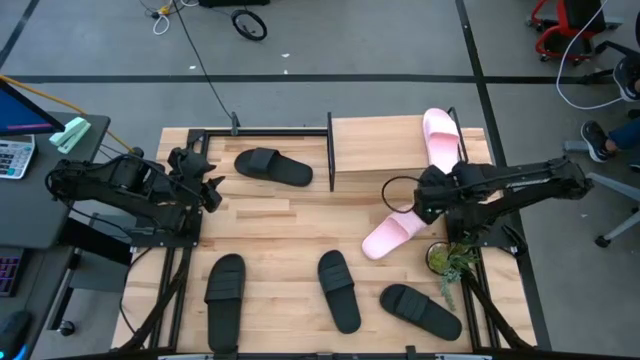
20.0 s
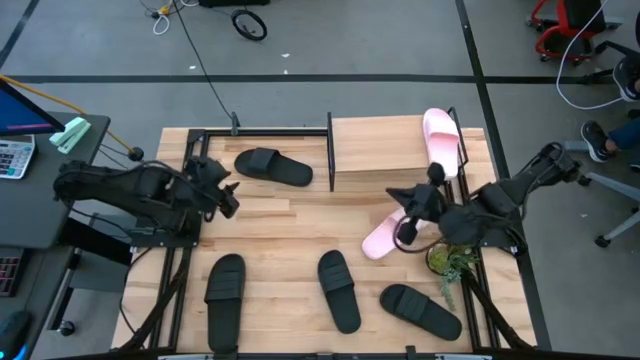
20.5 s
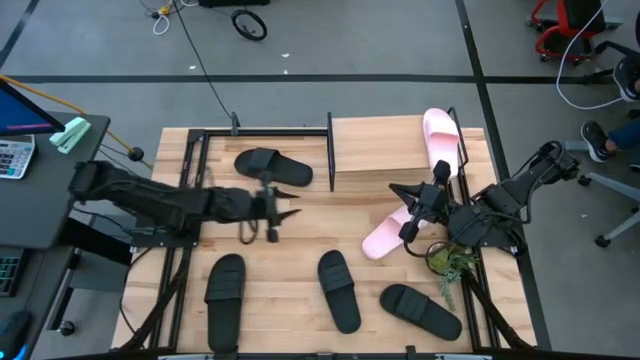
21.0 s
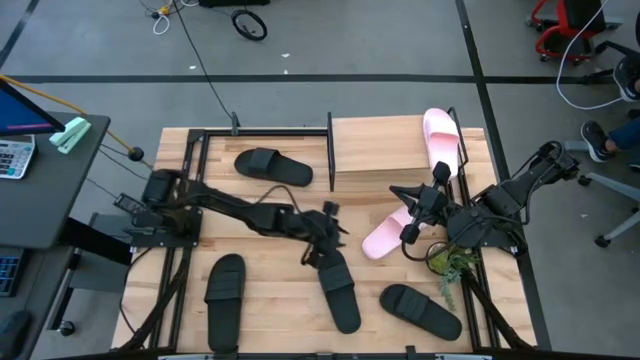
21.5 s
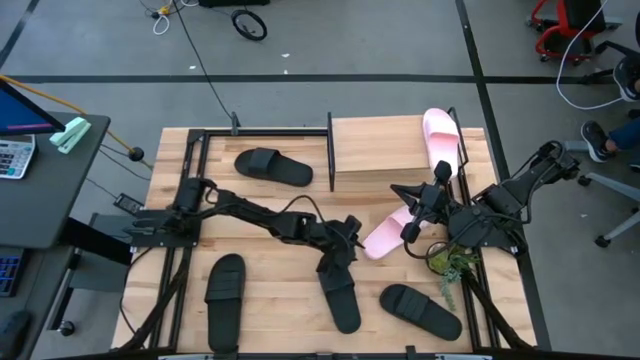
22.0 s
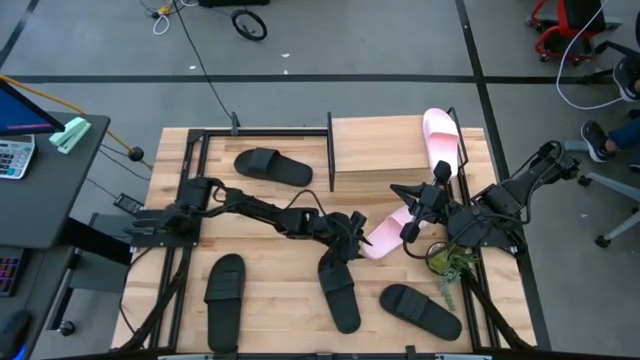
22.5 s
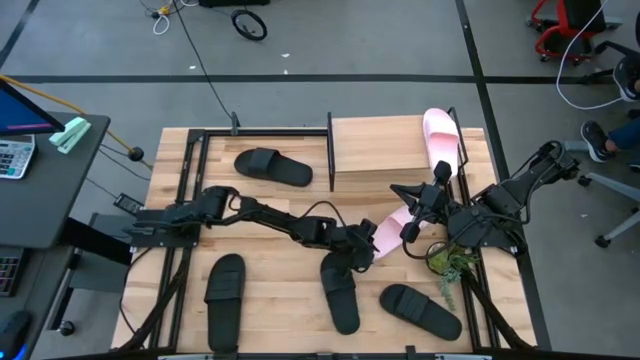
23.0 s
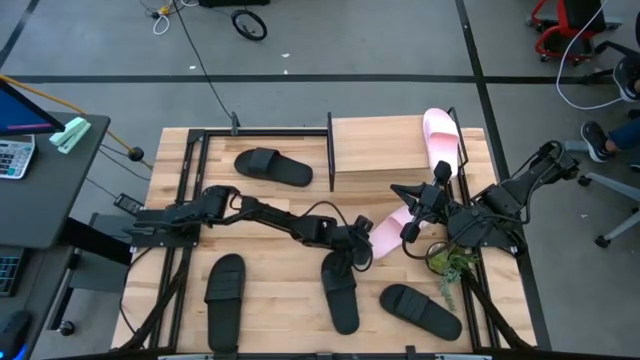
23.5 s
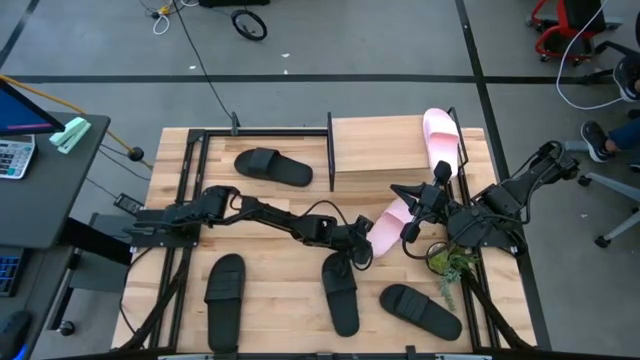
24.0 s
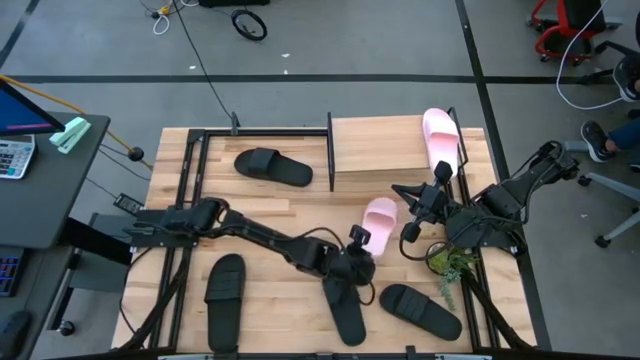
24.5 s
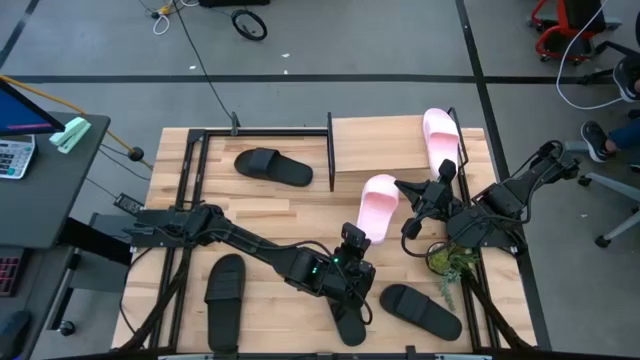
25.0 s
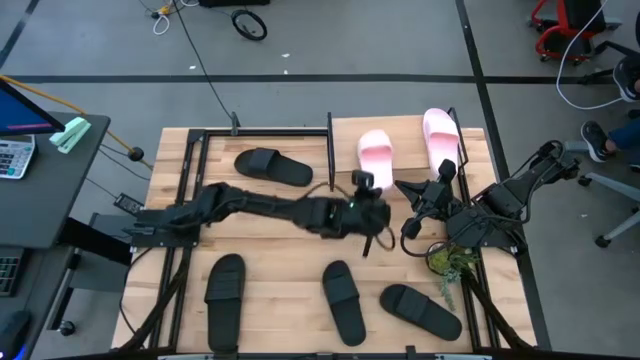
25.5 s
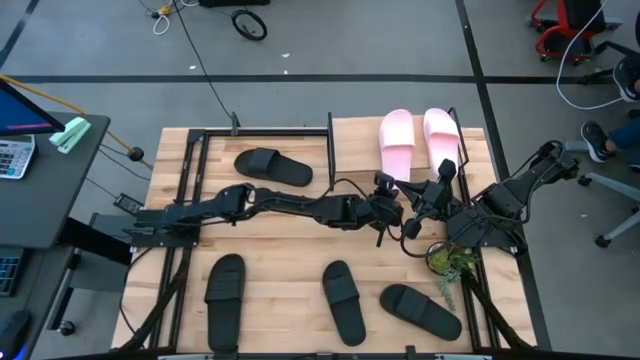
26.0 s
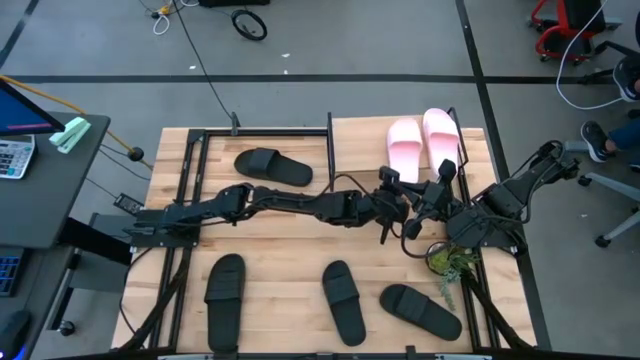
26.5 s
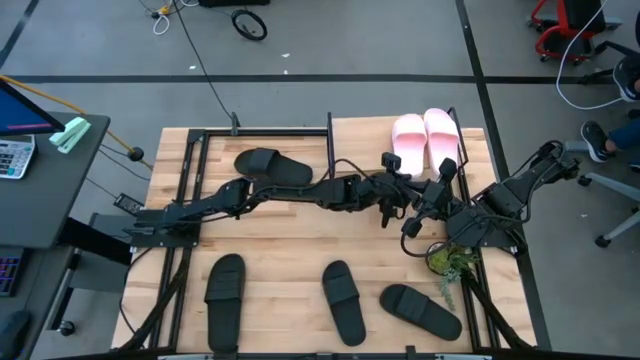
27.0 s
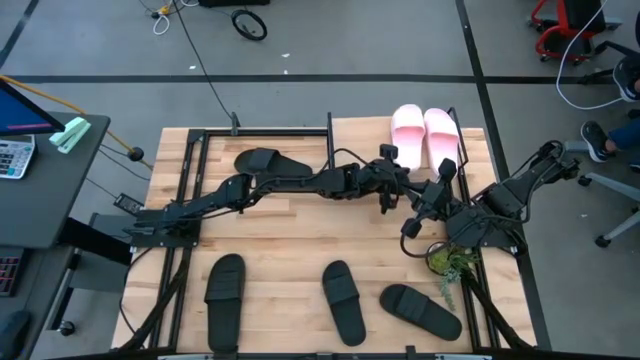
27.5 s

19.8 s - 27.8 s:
Task: Pick and place slides into the shelf
Put the pink slide on the shelf

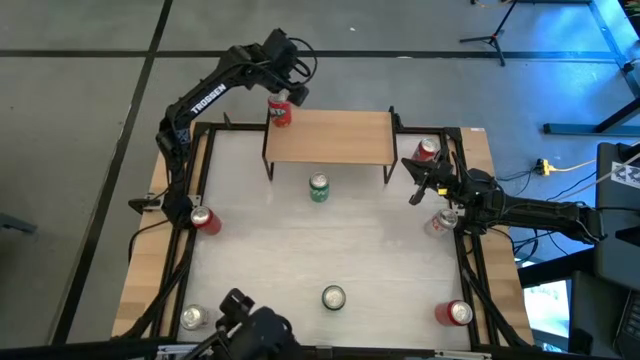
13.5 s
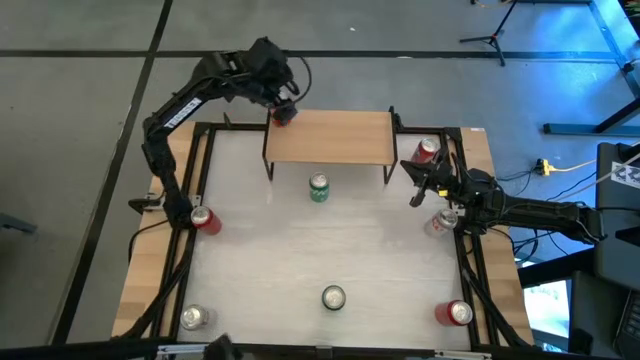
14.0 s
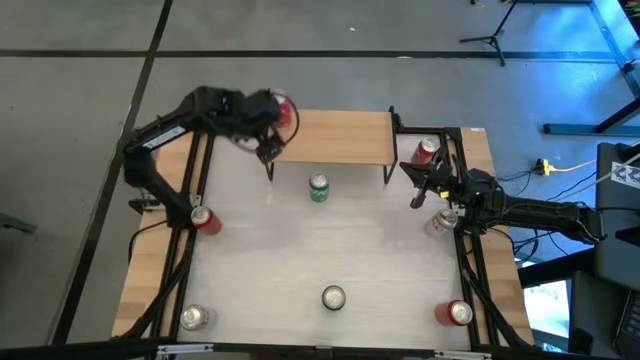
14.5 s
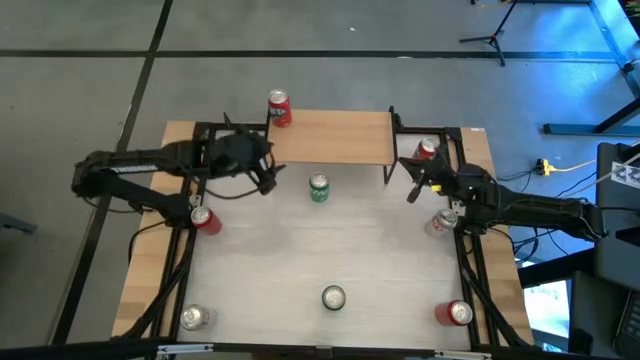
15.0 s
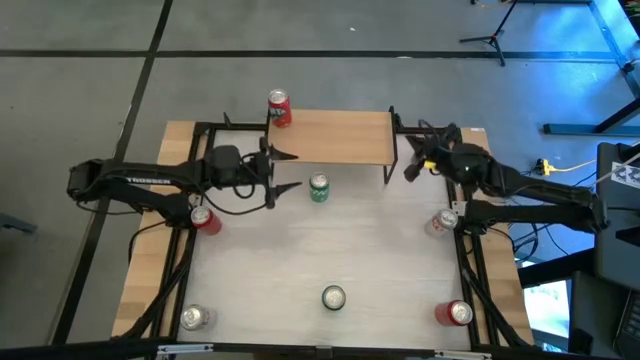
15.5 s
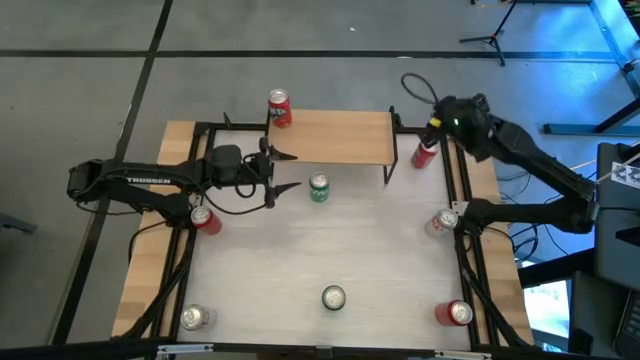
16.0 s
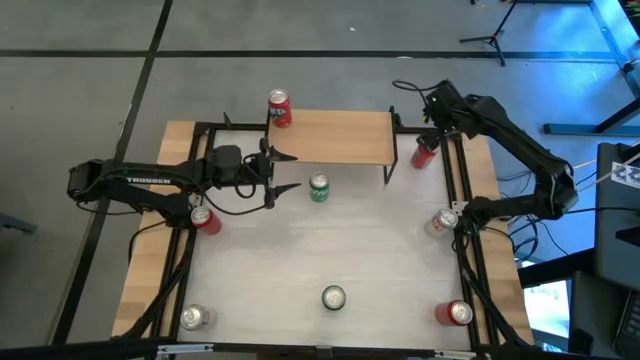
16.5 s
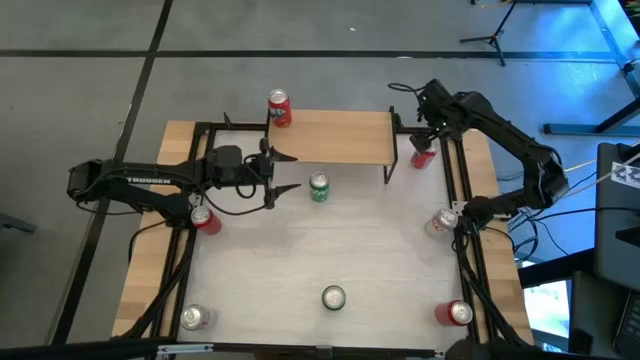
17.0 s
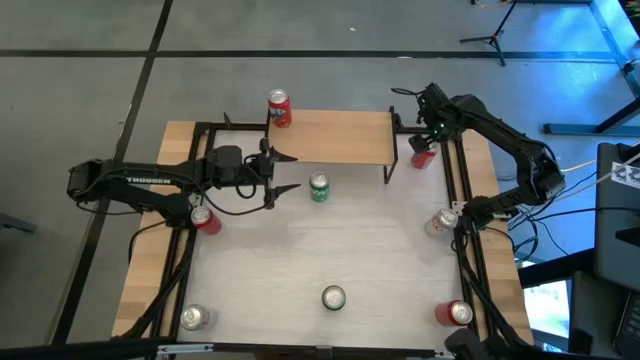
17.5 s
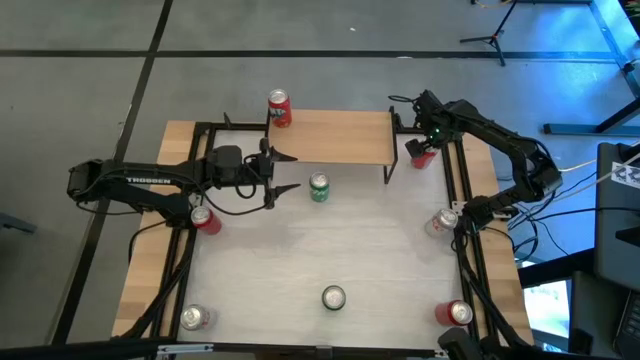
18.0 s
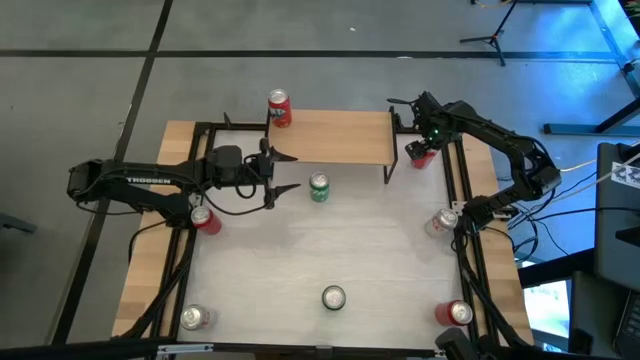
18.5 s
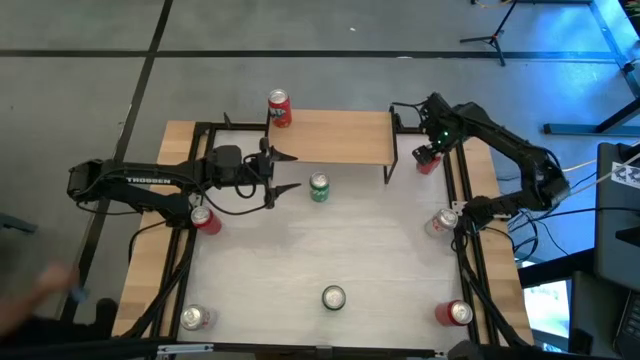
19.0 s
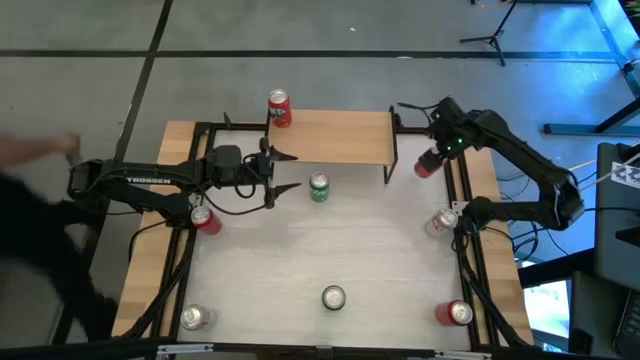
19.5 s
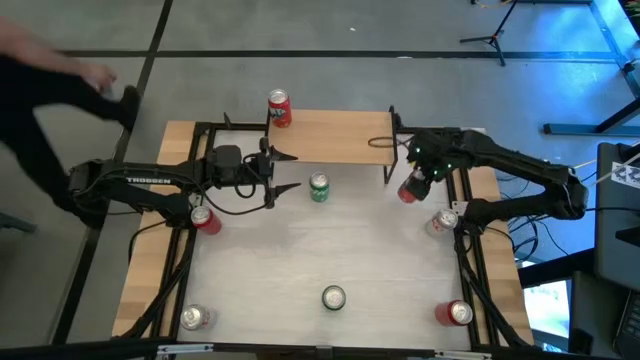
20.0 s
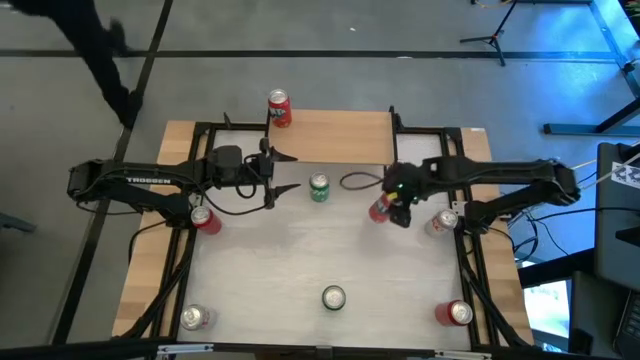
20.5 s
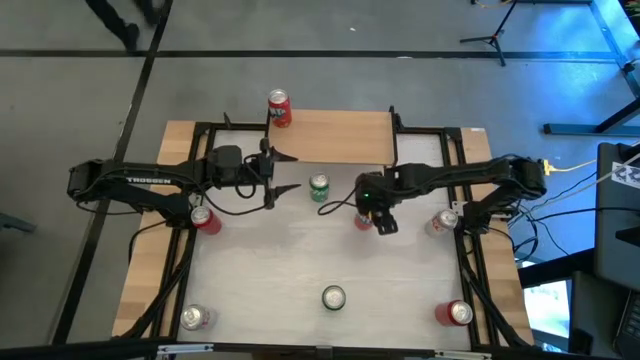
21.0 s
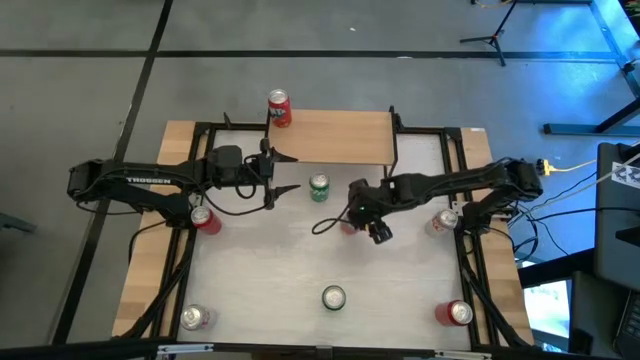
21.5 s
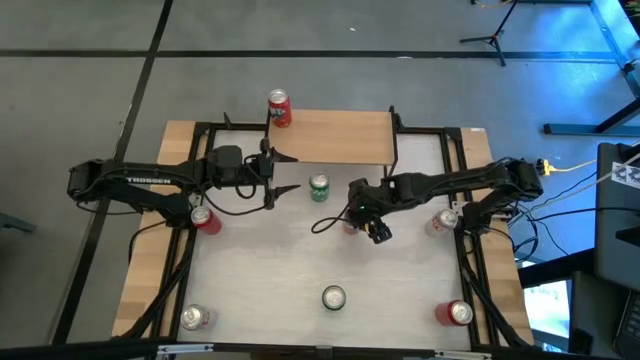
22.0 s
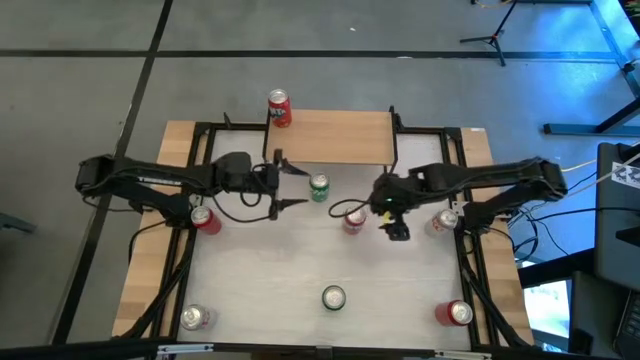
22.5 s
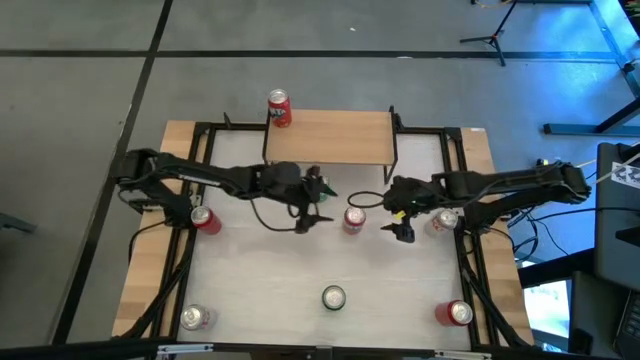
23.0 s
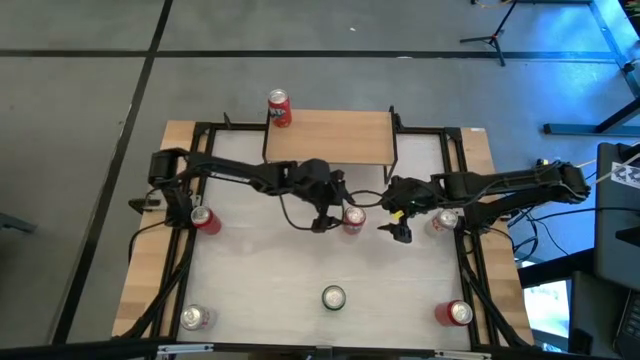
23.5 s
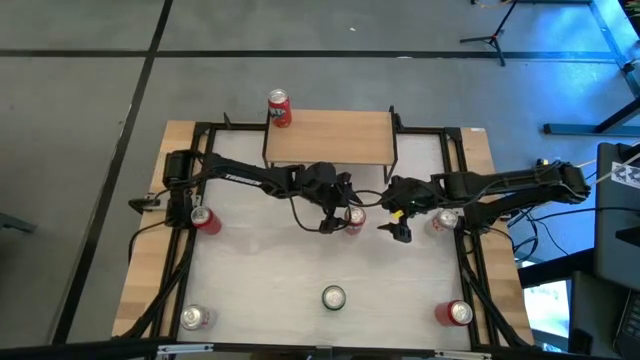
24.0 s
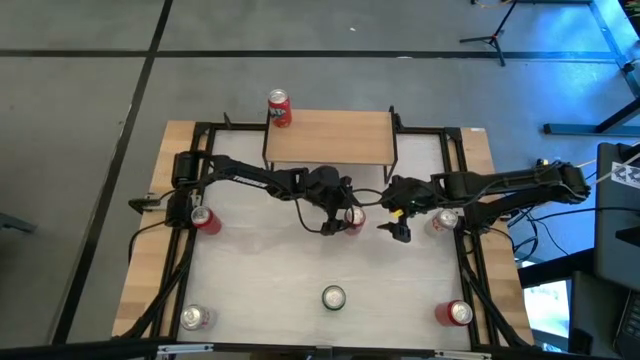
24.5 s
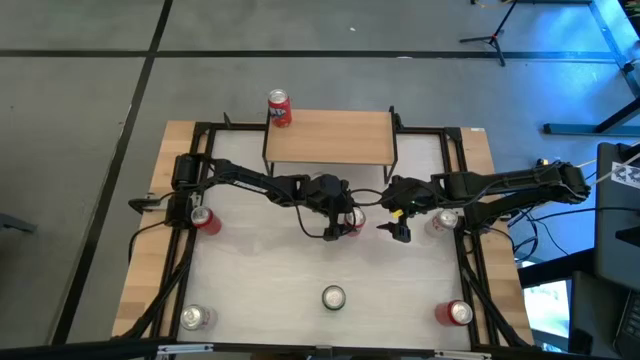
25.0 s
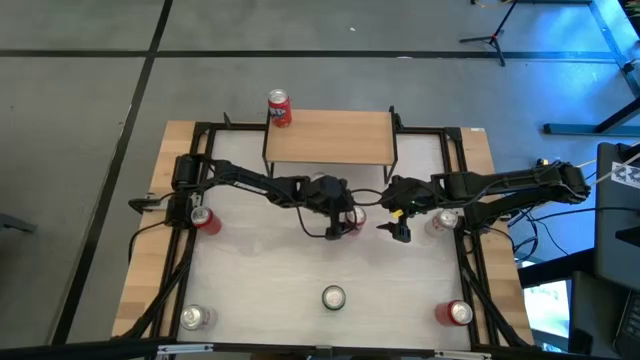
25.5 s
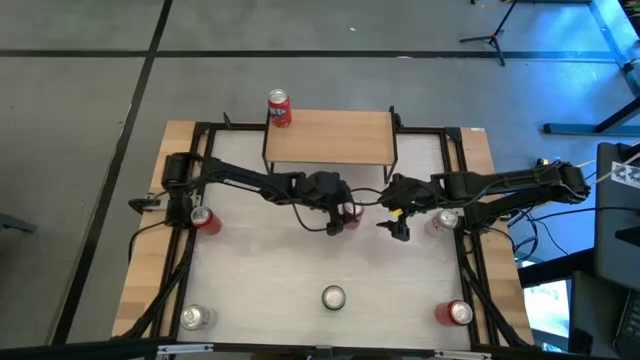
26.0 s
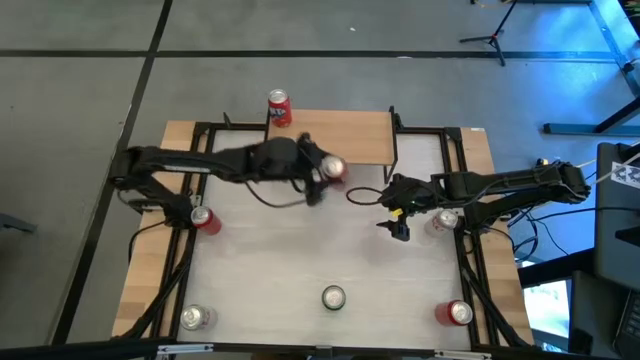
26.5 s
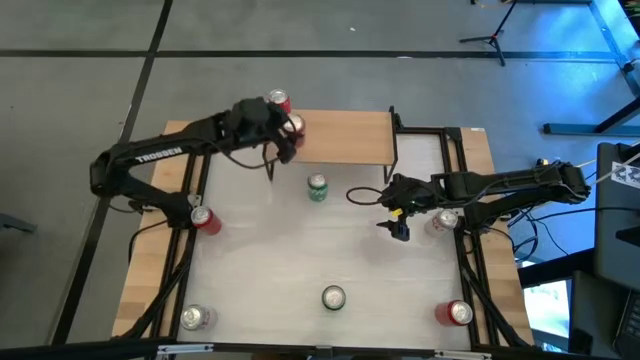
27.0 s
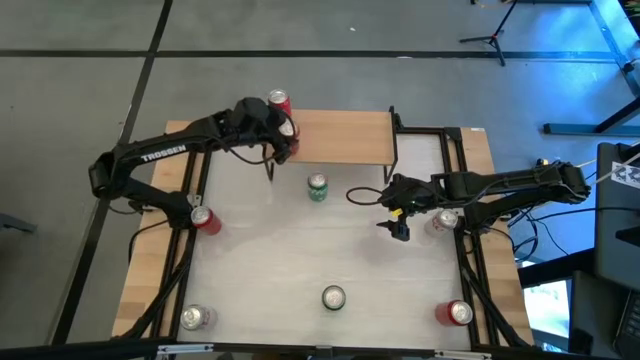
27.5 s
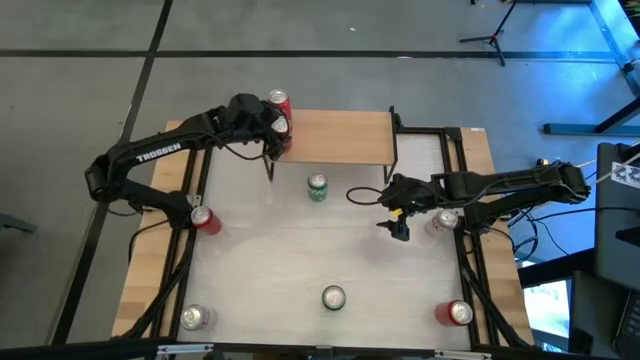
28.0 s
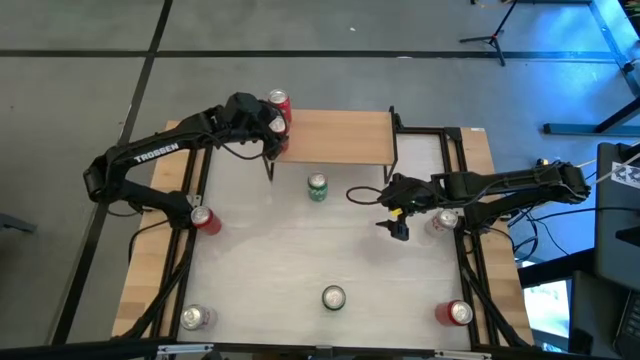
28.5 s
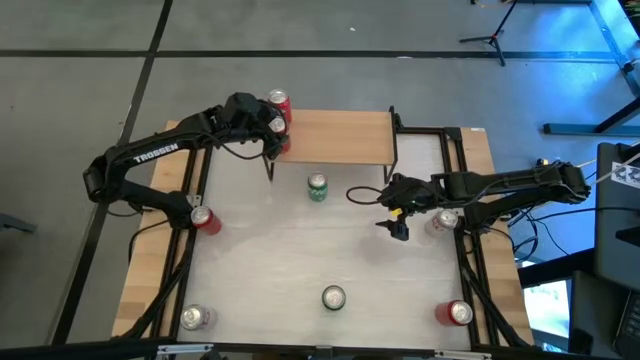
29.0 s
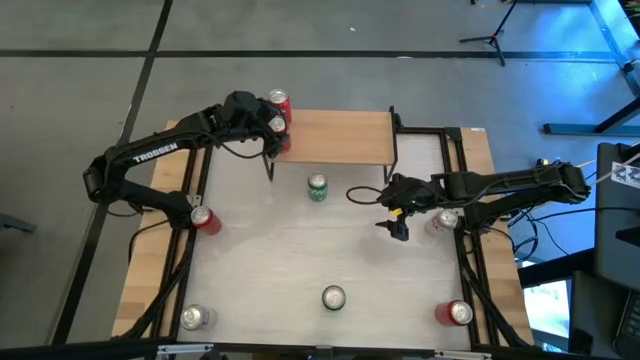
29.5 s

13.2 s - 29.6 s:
Task: Place canned beverage on shelf
Put the red soda can aligned with the other red soda can on the shelf
